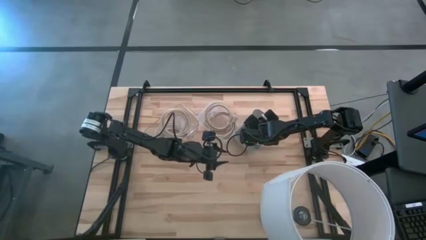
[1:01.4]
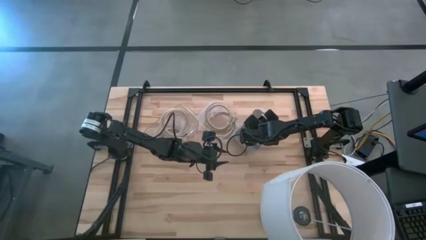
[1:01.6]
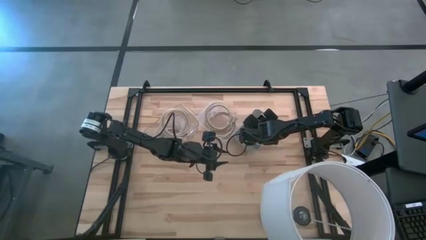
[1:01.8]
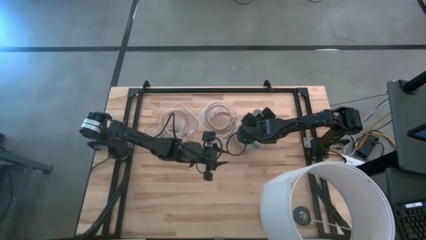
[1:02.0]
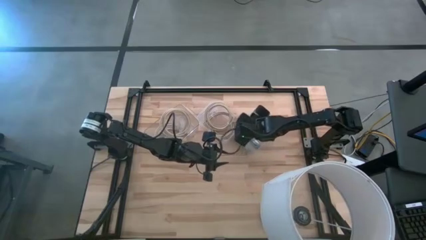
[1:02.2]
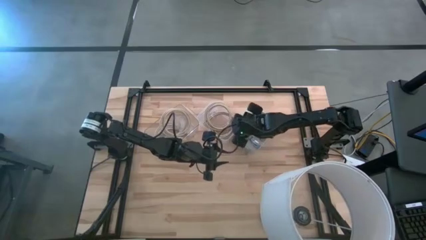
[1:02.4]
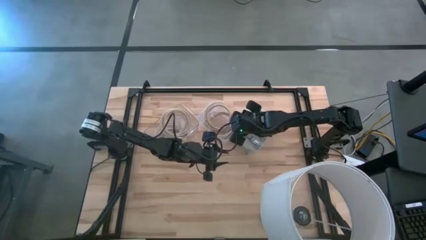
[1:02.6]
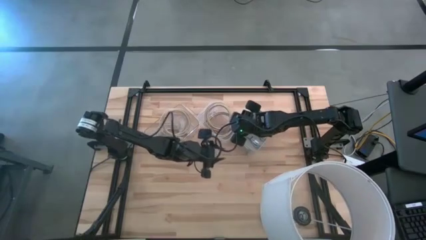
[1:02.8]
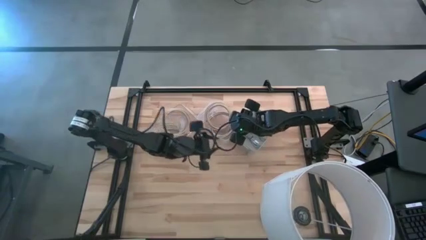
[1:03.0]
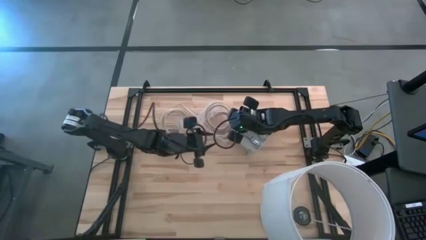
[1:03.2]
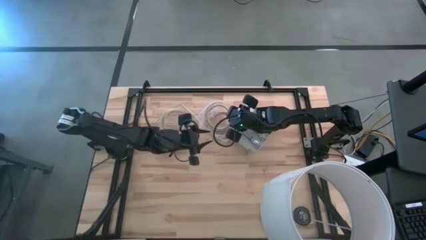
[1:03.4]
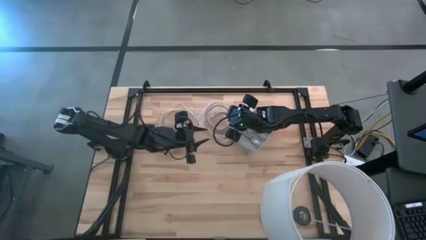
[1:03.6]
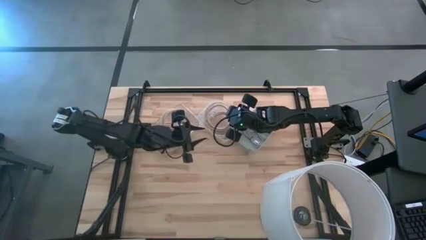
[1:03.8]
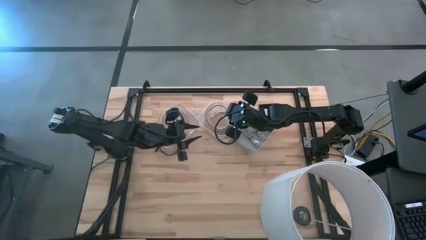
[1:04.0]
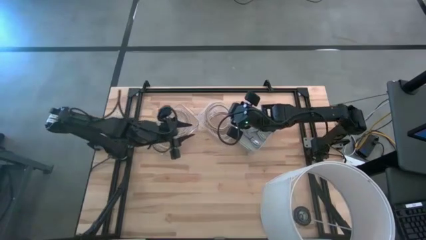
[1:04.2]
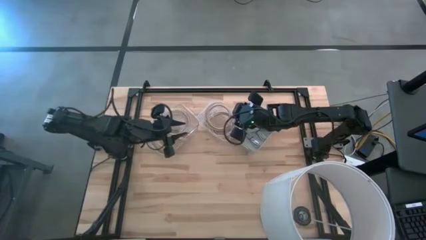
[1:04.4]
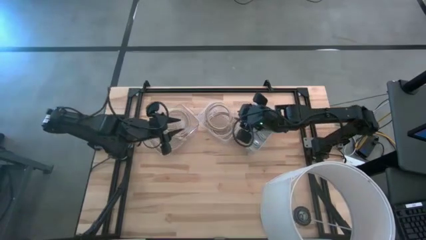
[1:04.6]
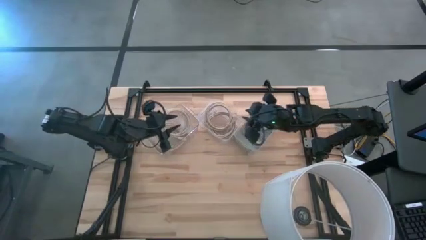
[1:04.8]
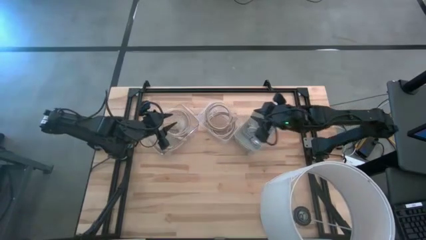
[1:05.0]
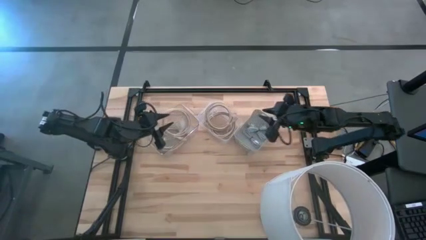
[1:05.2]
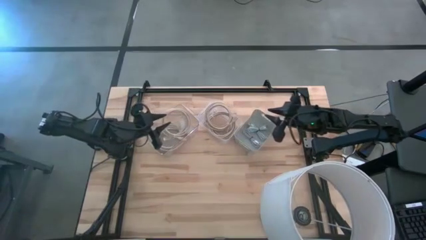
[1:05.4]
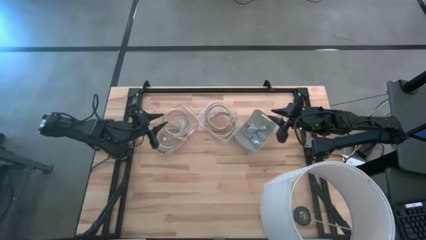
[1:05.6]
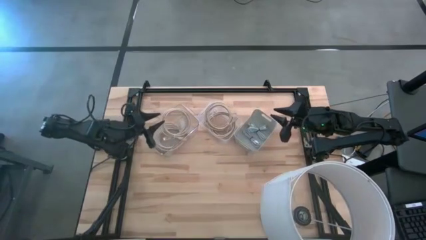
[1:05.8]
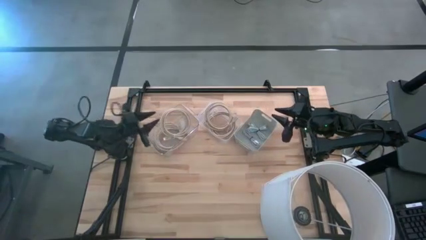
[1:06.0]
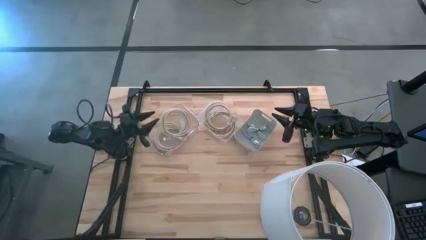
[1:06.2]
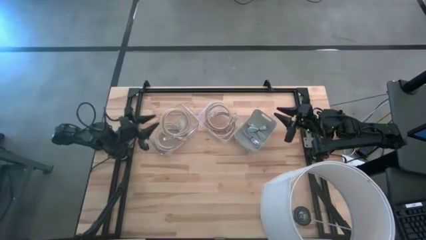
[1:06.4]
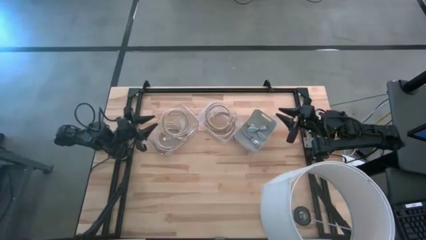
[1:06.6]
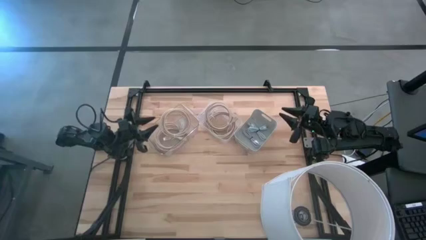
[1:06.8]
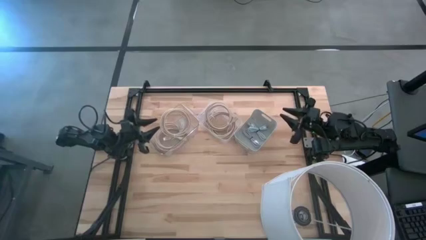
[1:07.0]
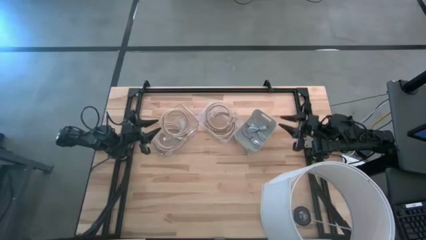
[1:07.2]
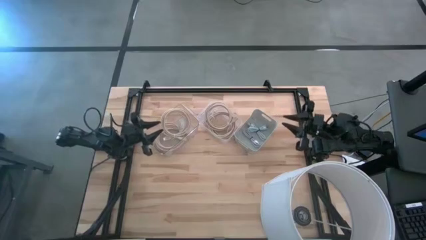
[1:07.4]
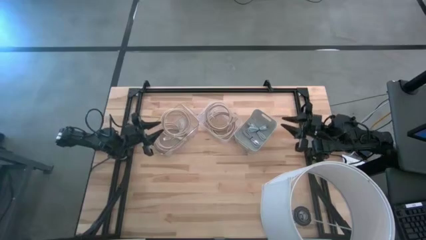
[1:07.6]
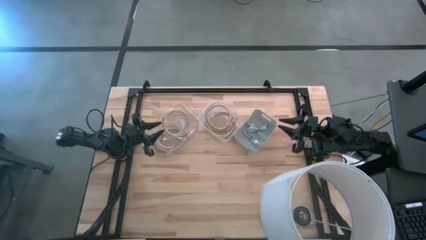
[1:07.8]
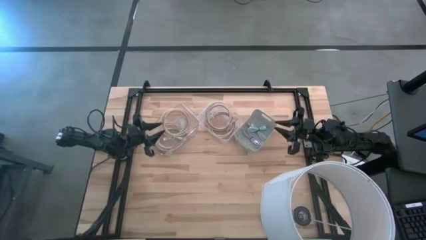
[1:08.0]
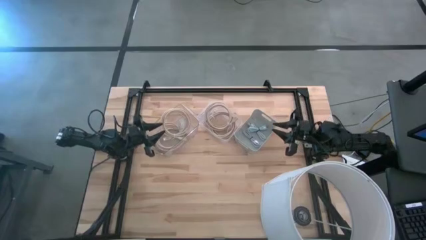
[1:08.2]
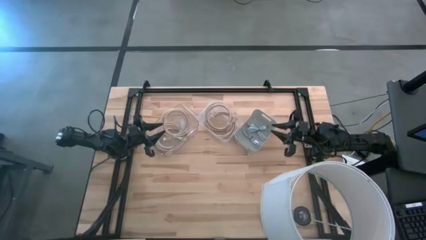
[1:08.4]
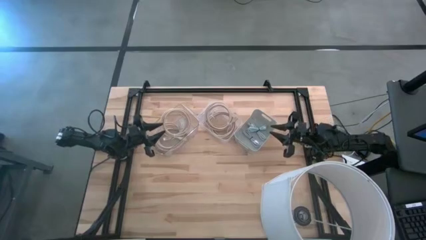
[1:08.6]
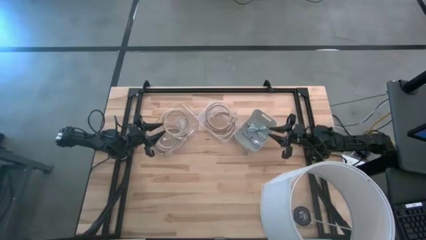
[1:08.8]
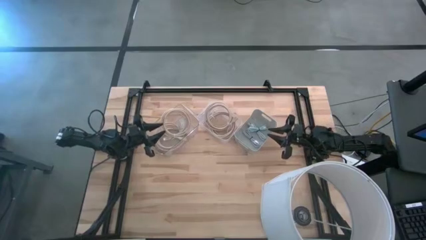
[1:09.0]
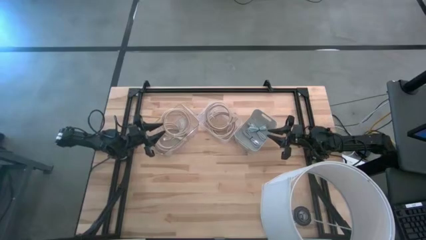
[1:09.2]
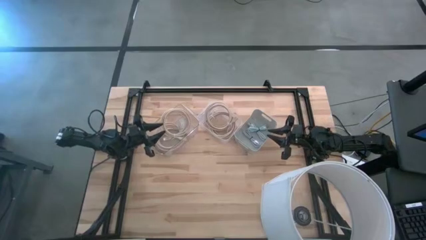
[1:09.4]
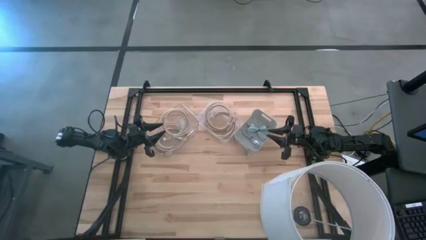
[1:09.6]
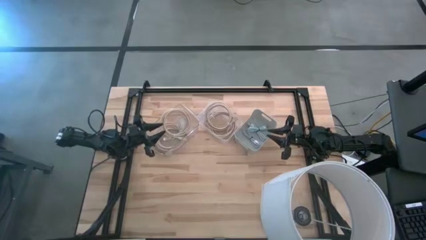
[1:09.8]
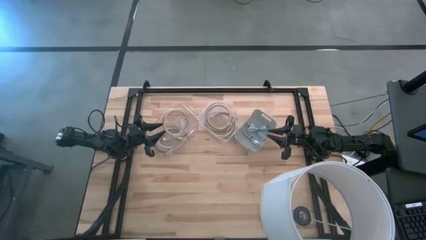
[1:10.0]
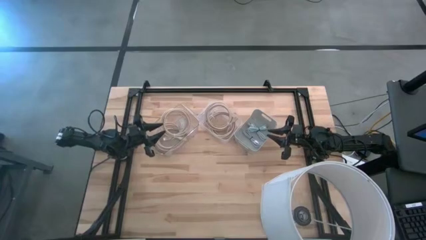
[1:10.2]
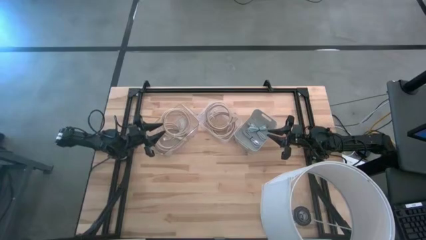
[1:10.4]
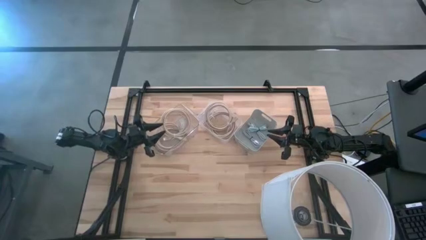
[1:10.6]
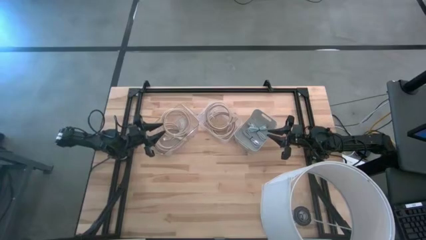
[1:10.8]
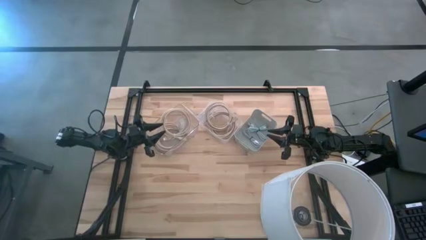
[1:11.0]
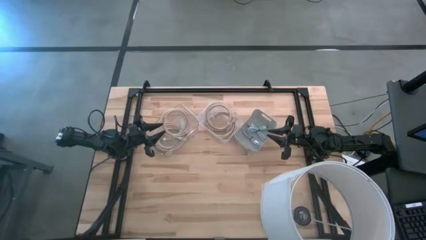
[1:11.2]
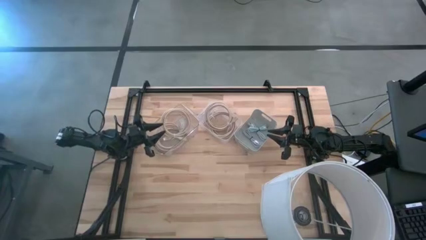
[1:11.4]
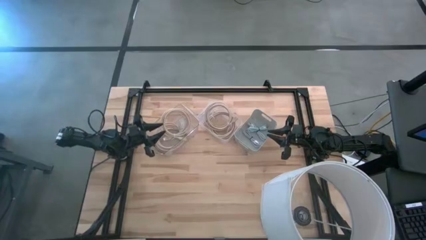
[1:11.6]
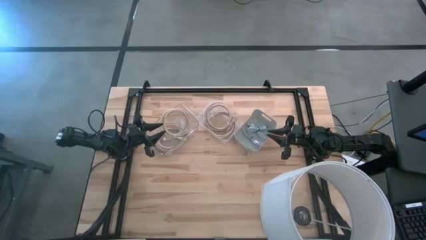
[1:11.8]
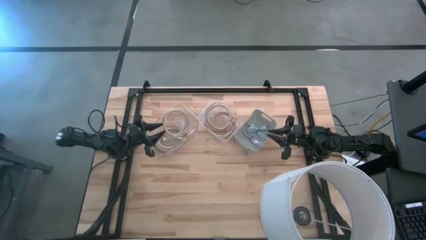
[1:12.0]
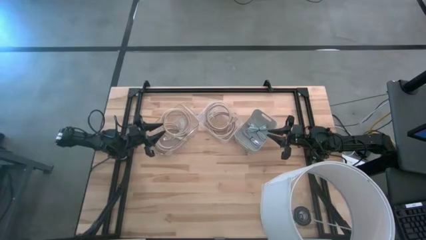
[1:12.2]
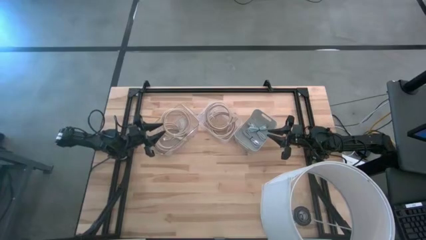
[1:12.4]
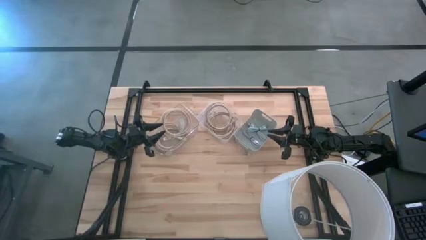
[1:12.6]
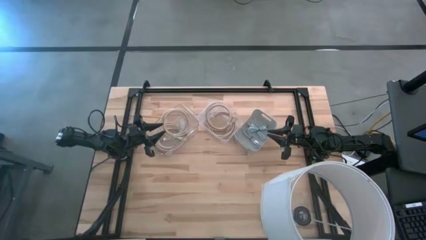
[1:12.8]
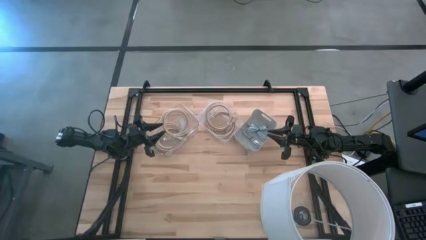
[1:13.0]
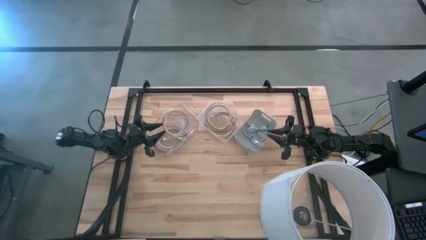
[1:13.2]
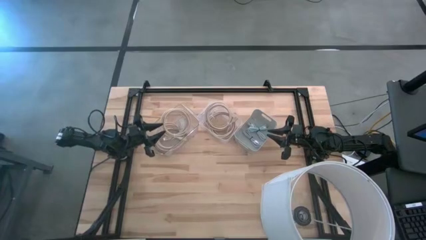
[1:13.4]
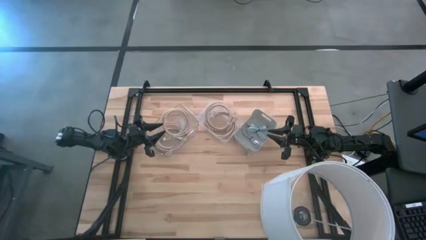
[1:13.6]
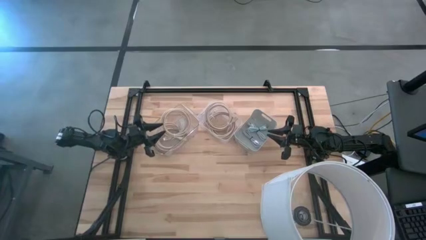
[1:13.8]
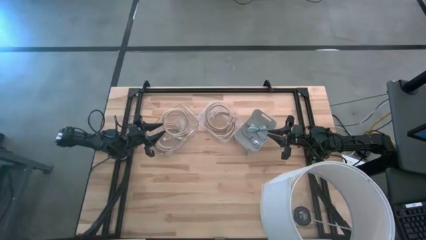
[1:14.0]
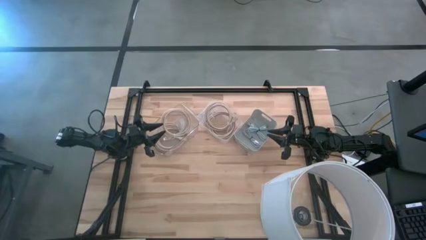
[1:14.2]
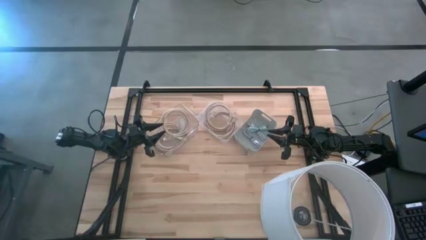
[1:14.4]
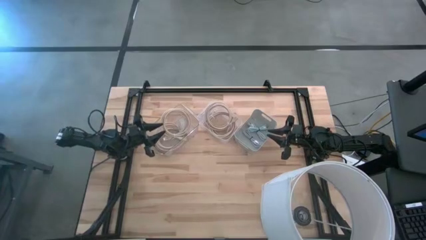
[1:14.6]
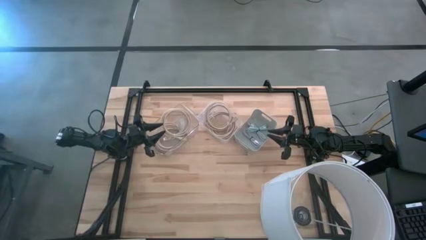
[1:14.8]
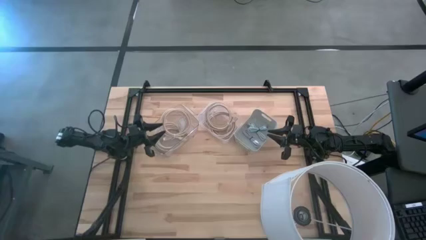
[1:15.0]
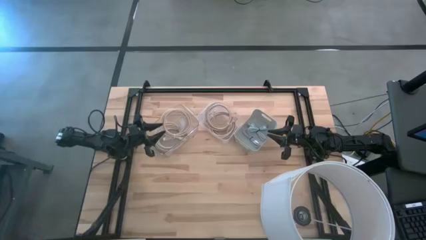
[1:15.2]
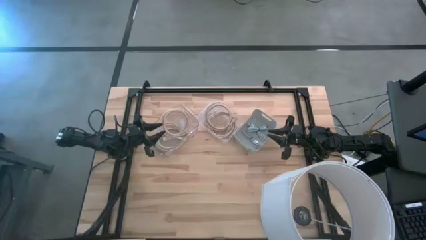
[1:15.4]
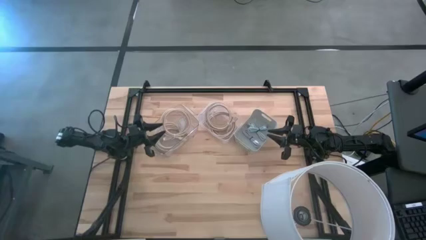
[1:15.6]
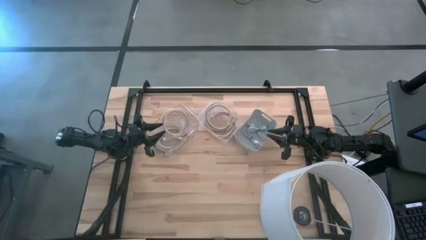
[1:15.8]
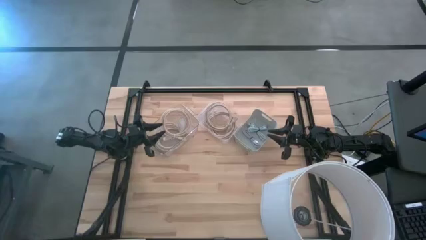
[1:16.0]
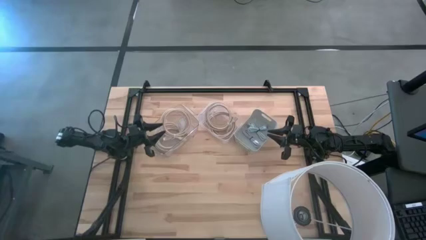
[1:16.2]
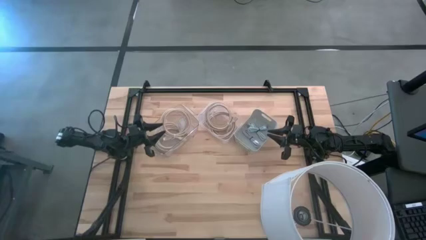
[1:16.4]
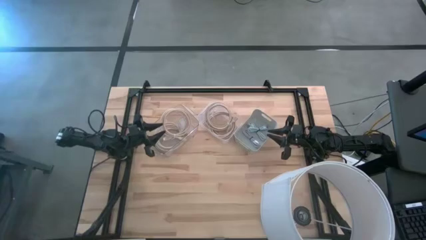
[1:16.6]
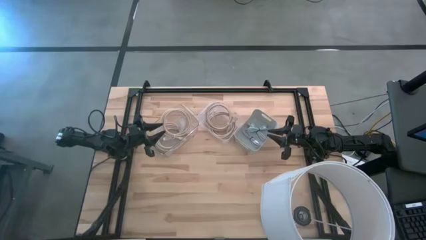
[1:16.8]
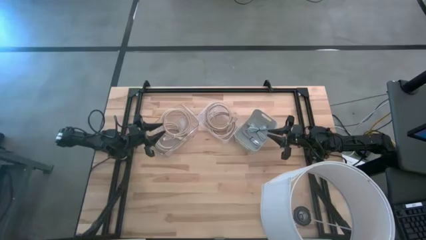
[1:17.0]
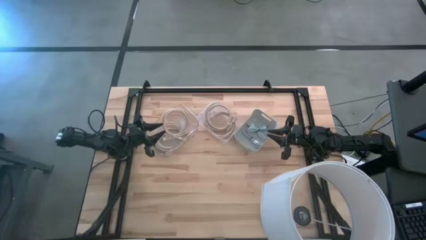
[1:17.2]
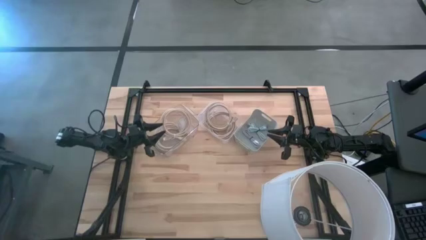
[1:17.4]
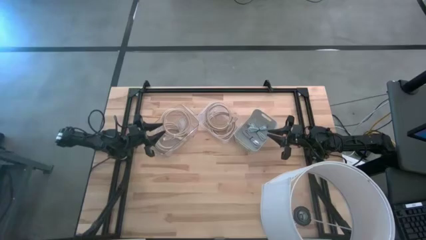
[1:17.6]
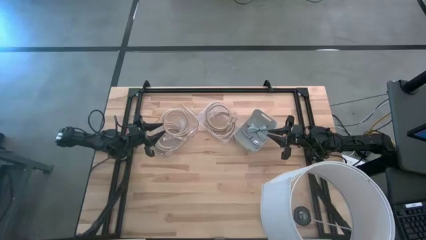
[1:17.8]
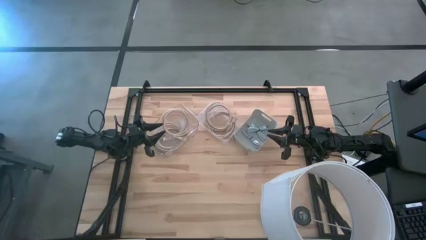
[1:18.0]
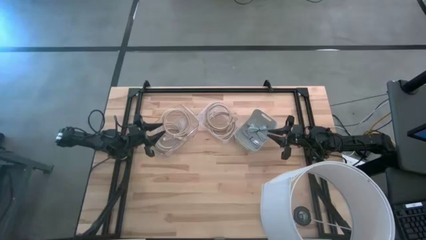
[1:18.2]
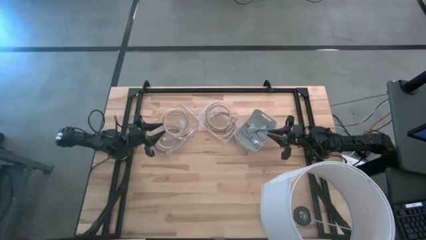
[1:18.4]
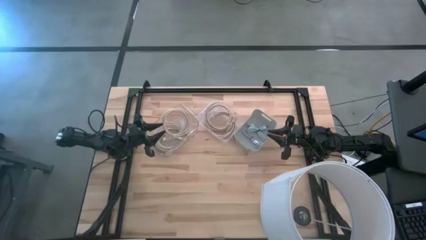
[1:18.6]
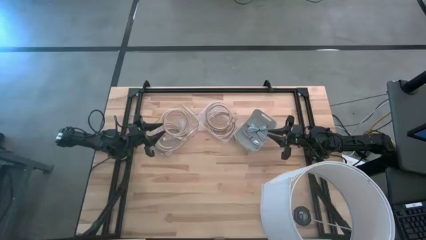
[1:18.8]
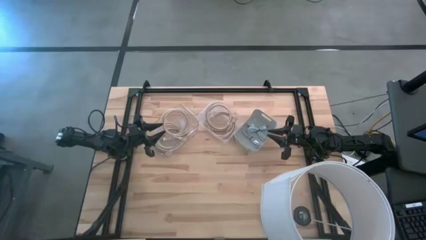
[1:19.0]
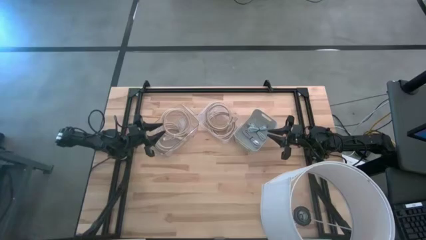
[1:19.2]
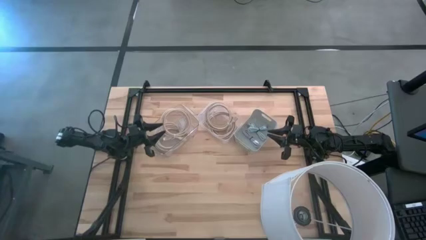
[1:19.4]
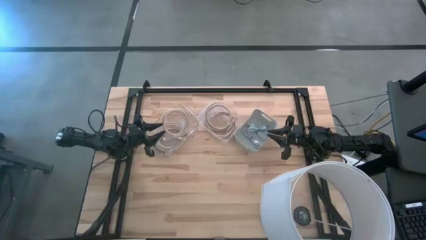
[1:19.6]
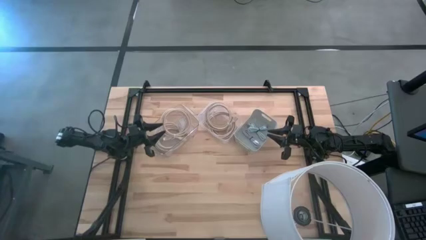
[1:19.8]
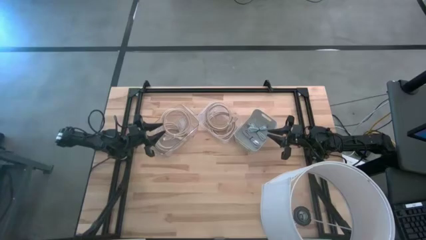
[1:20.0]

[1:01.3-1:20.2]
Task: Pick & Place USB Port
Return to Home Position
